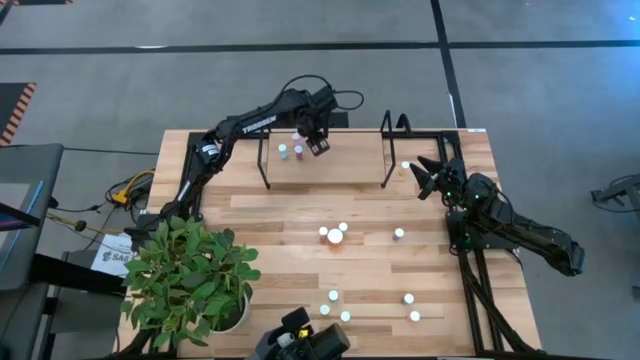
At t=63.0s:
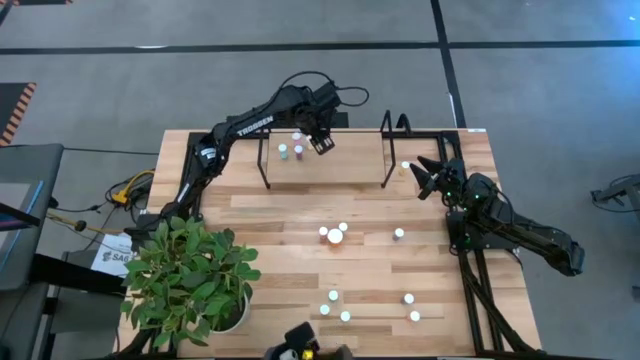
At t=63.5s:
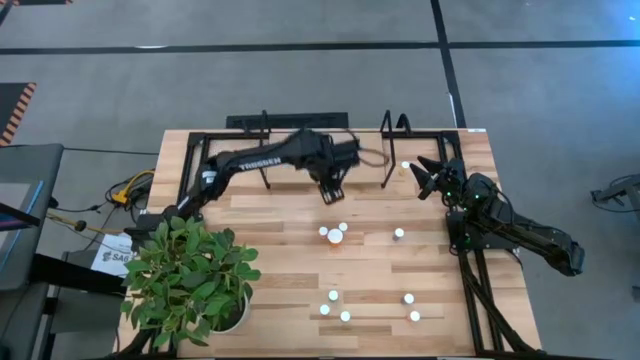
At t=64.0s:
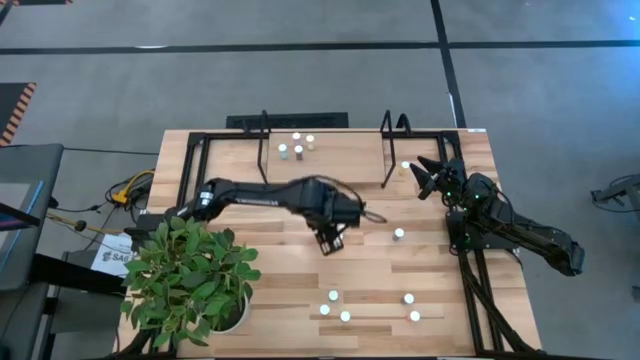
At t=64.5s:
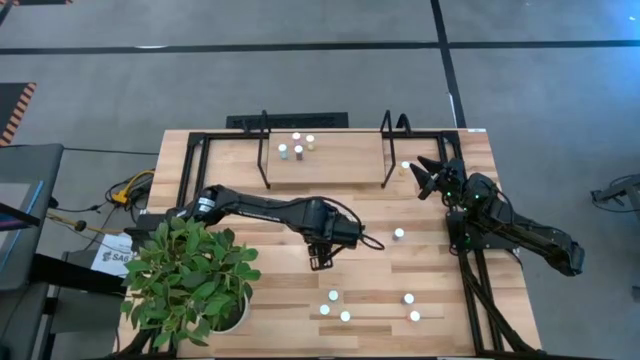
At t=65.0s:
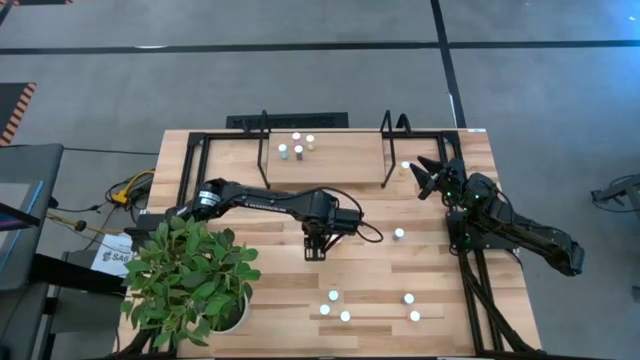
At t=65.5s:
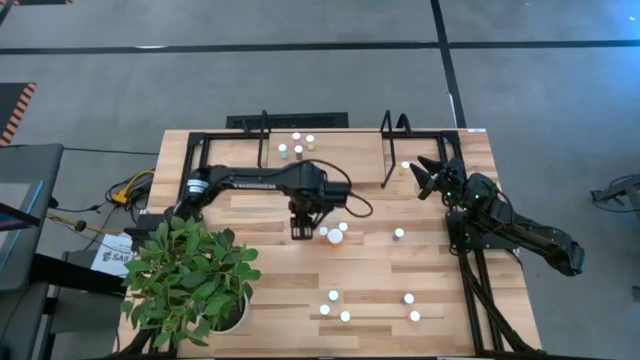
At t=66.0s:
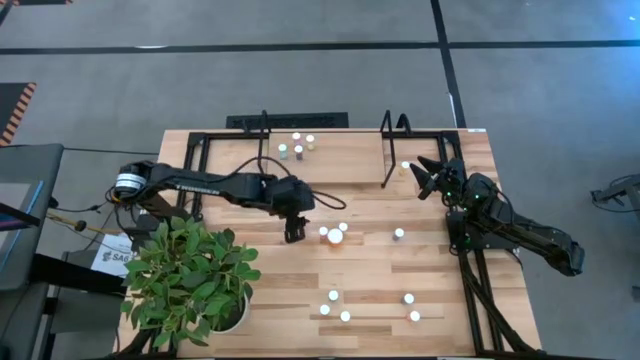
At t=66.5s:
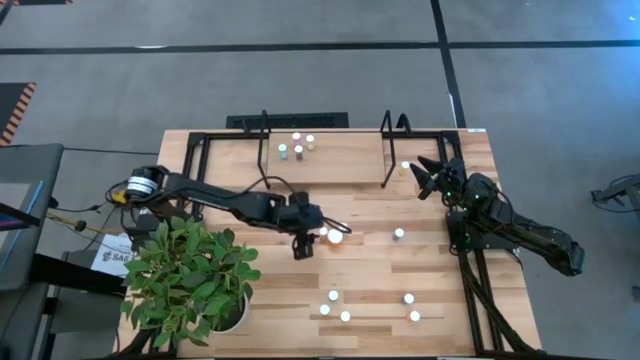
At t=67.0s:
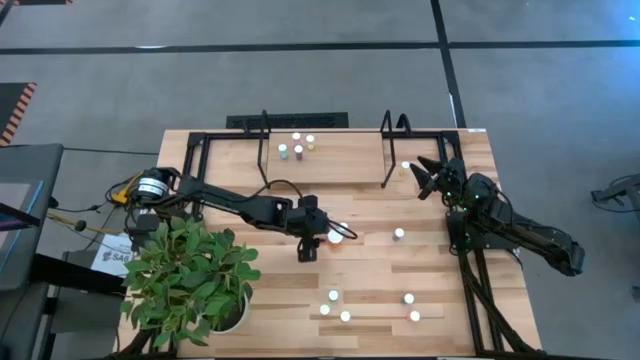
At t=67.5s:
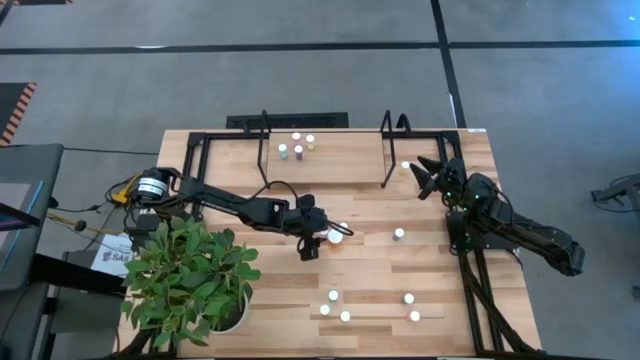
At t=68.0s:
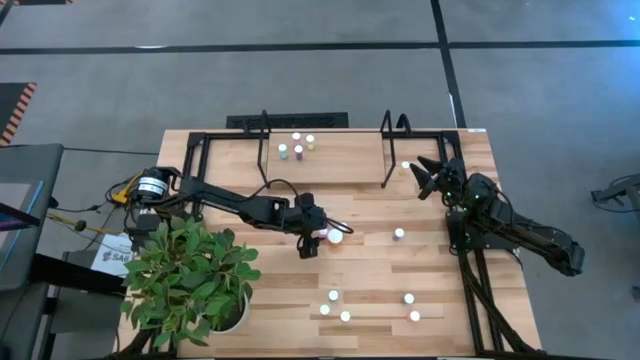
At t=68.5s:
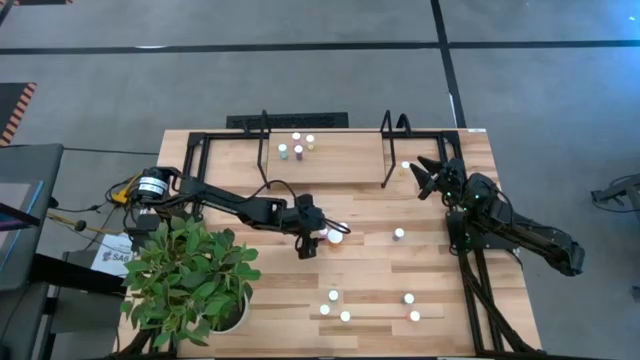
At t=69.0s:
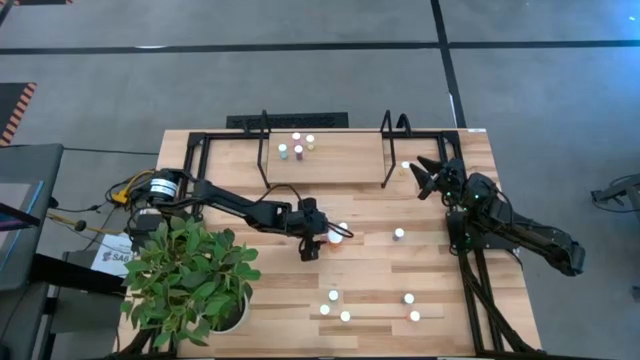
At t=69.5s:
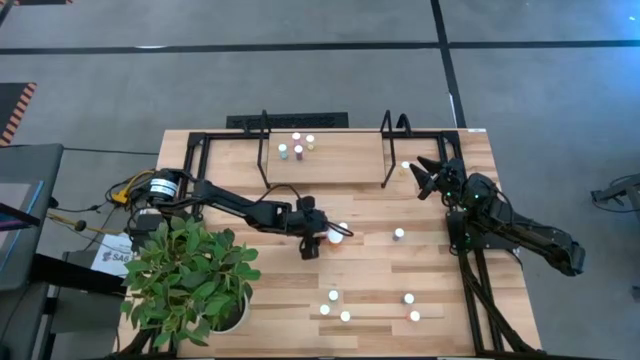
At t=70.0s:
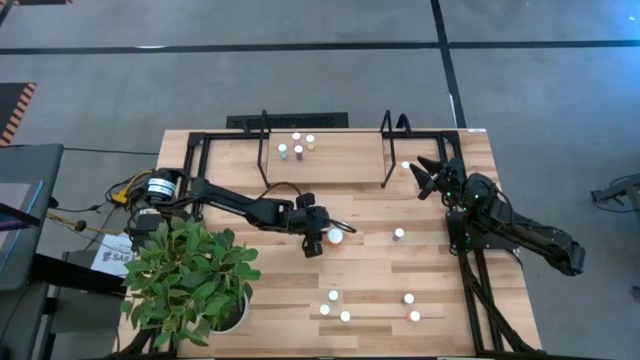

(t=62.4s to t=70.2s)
Task: Pick and place medicine bottles onto shelf by color
Put the pink pill bottle on the shelf

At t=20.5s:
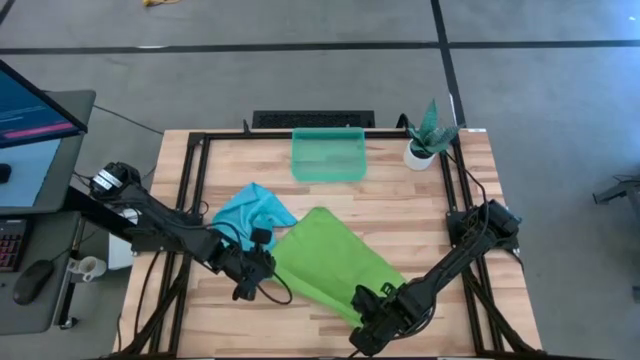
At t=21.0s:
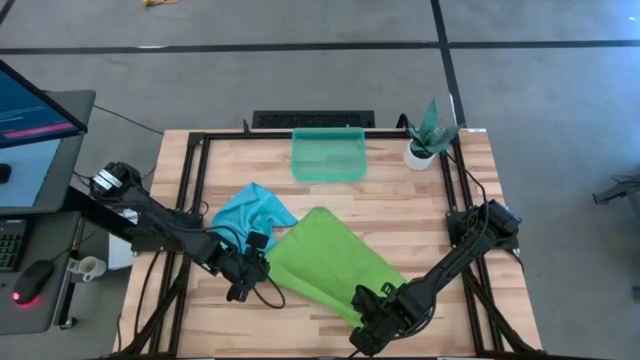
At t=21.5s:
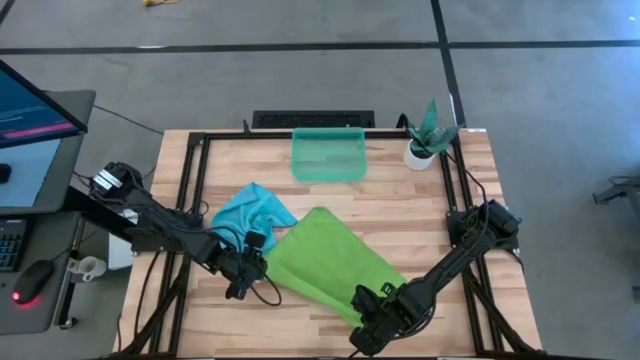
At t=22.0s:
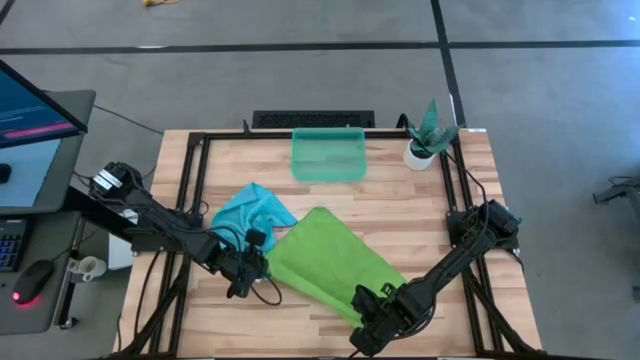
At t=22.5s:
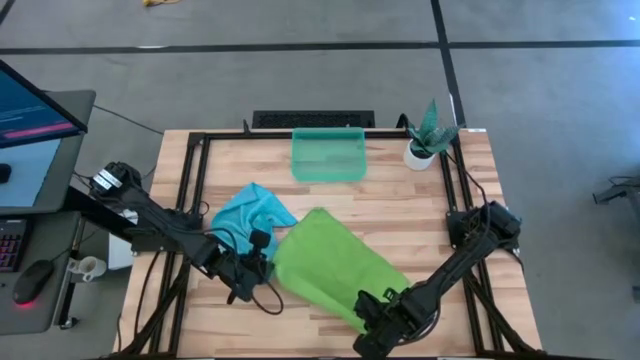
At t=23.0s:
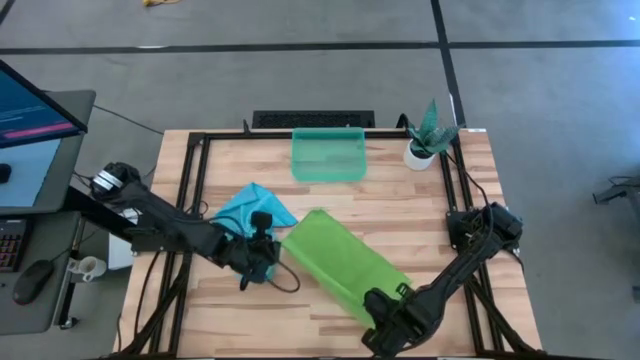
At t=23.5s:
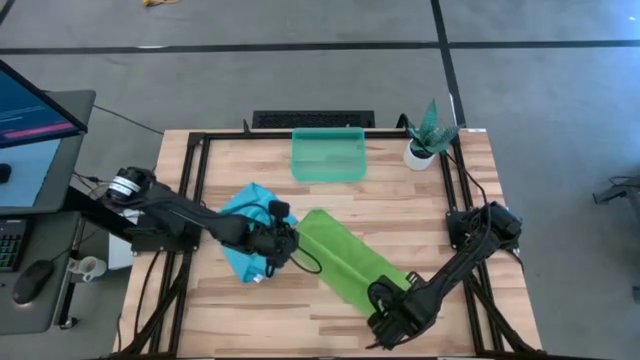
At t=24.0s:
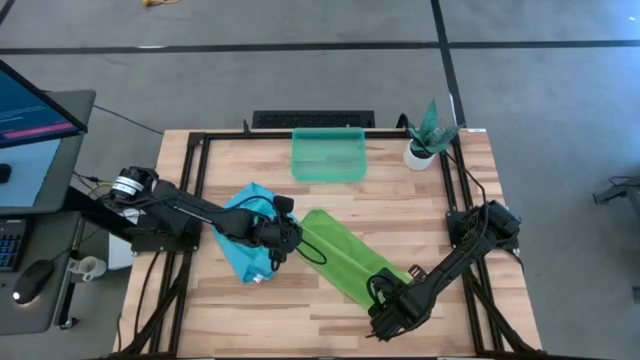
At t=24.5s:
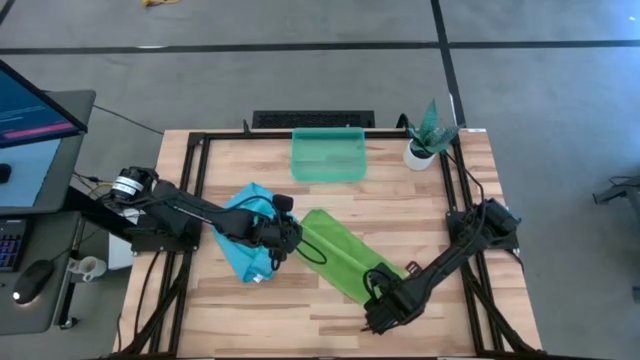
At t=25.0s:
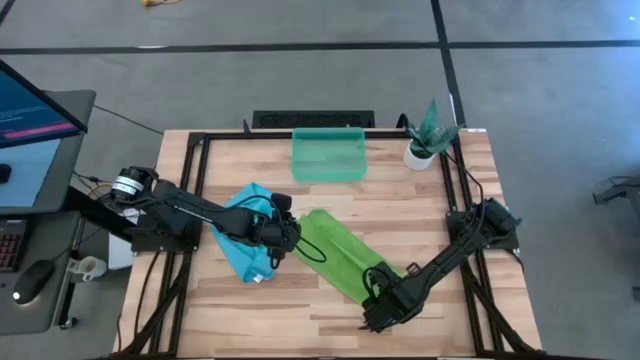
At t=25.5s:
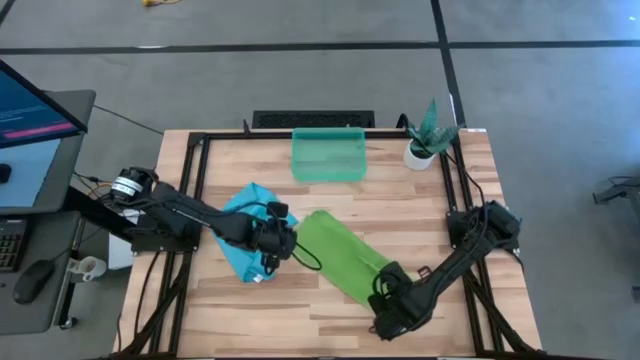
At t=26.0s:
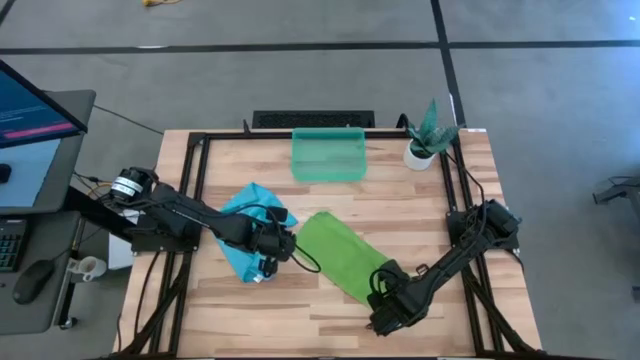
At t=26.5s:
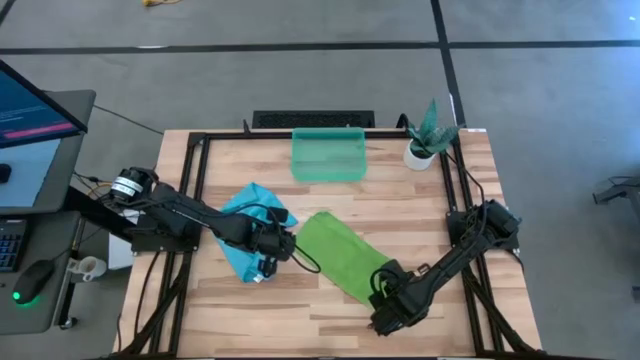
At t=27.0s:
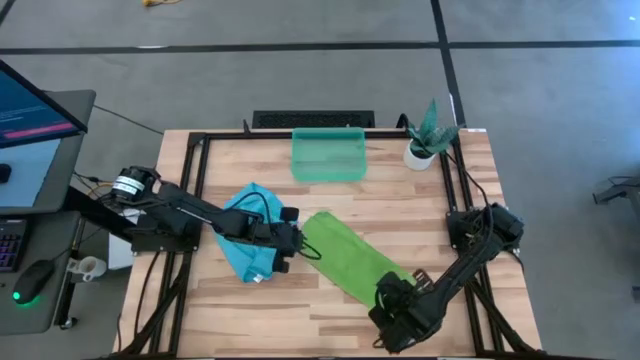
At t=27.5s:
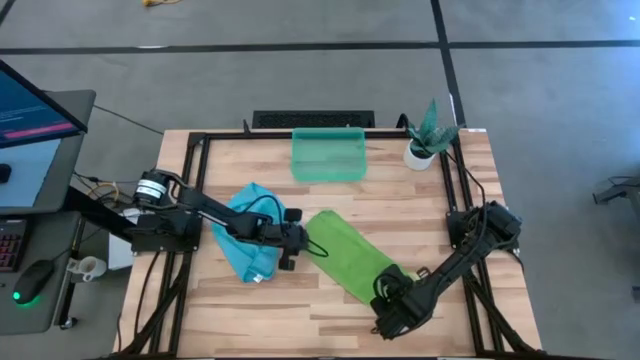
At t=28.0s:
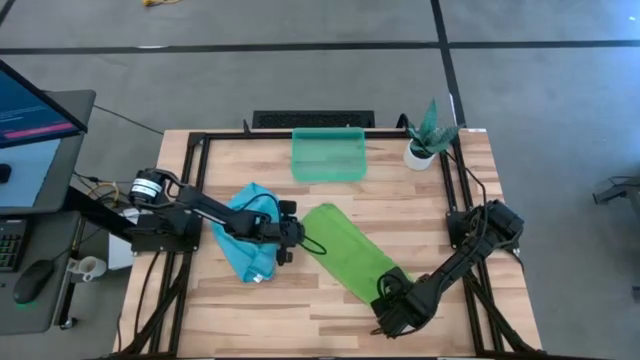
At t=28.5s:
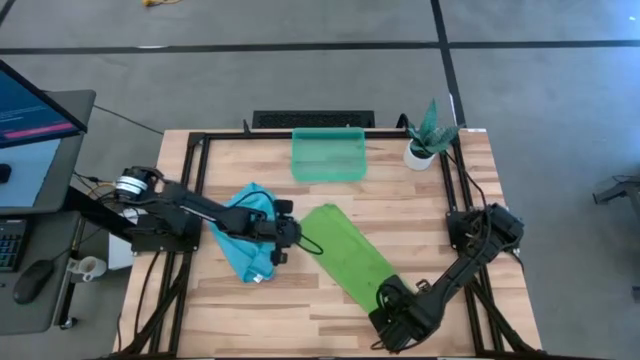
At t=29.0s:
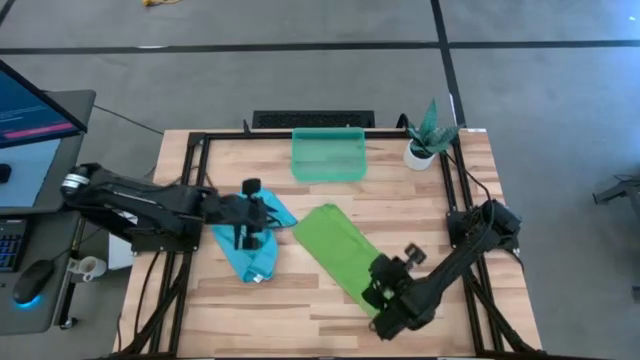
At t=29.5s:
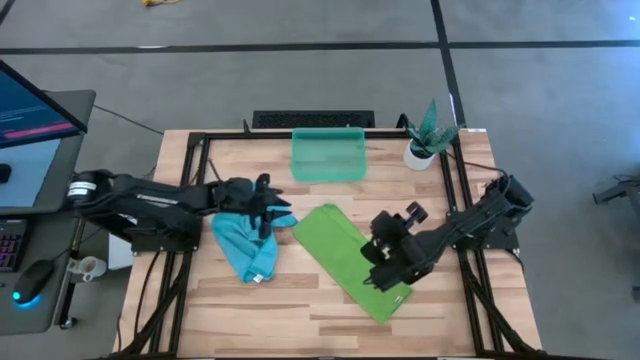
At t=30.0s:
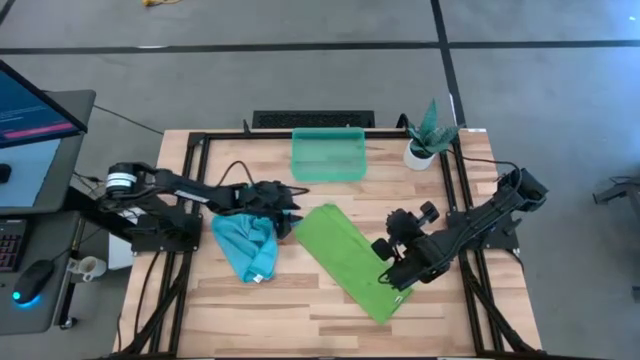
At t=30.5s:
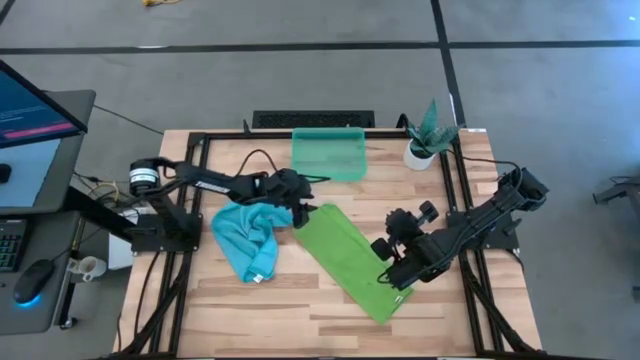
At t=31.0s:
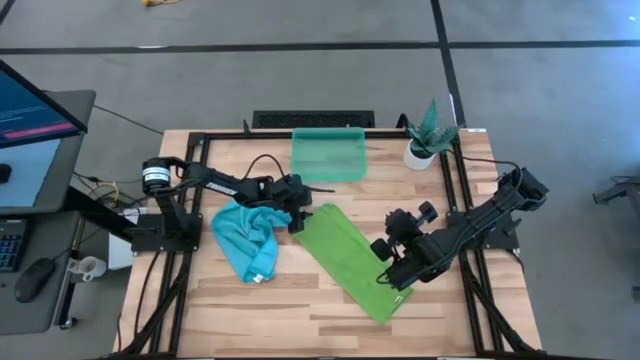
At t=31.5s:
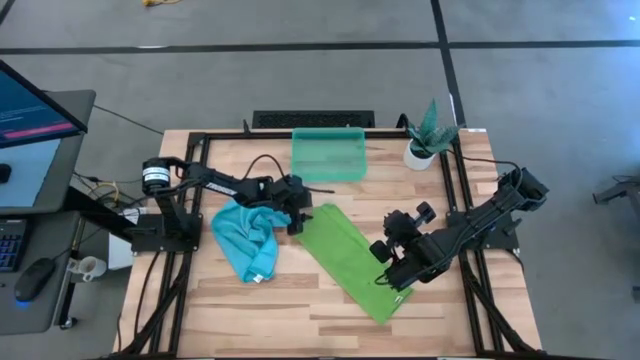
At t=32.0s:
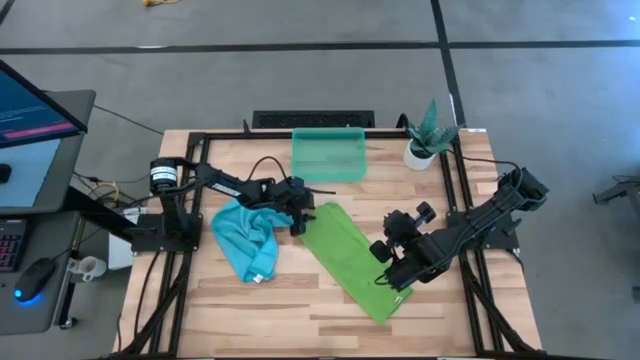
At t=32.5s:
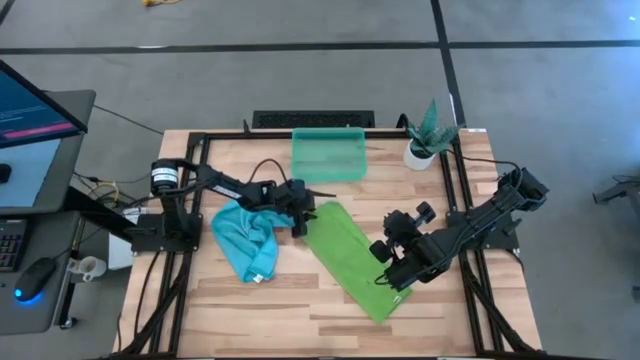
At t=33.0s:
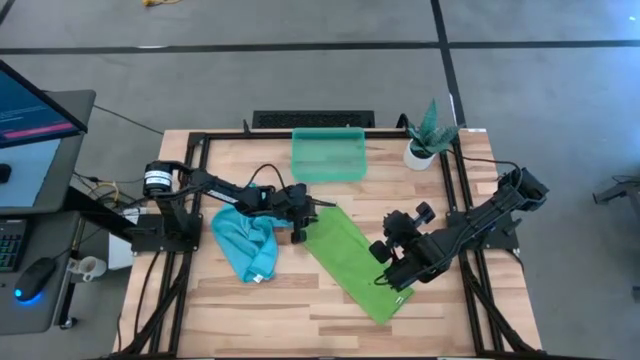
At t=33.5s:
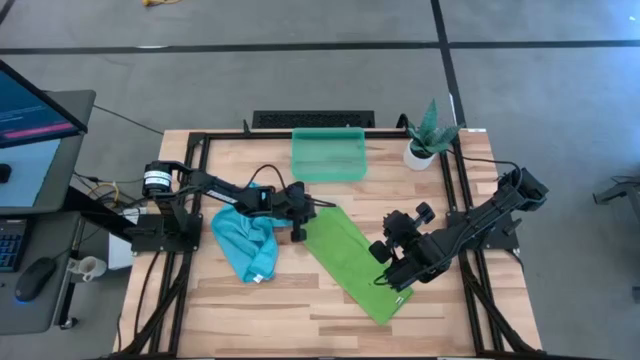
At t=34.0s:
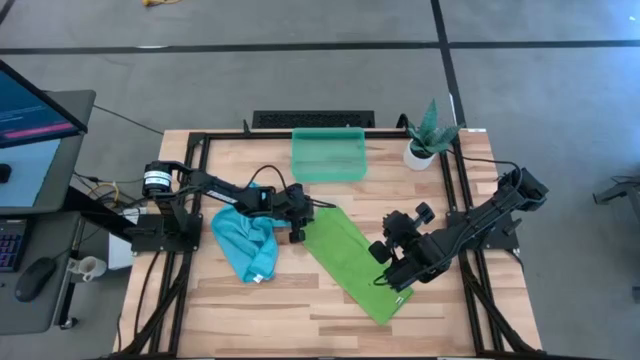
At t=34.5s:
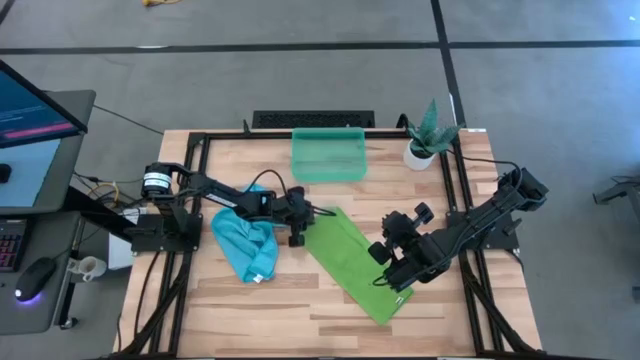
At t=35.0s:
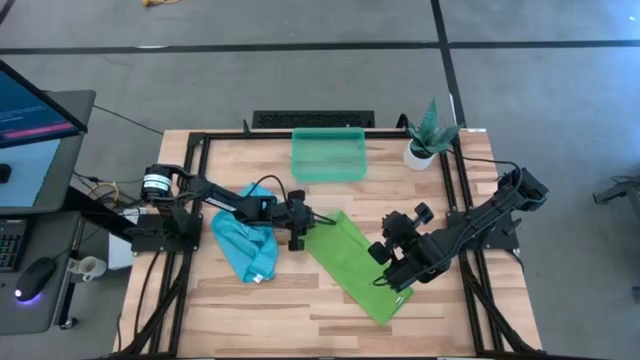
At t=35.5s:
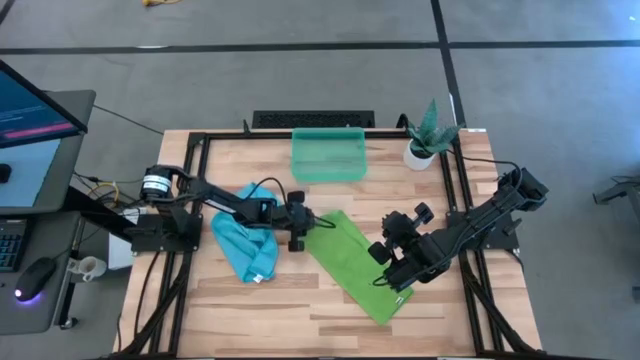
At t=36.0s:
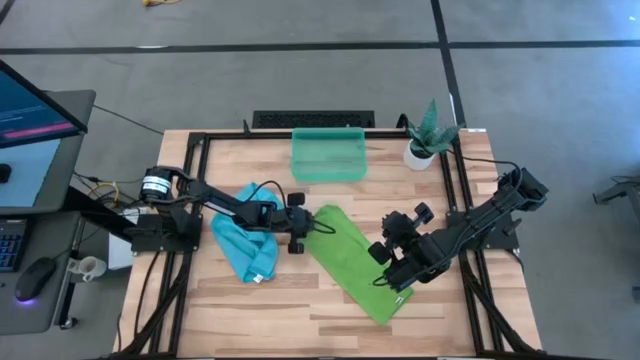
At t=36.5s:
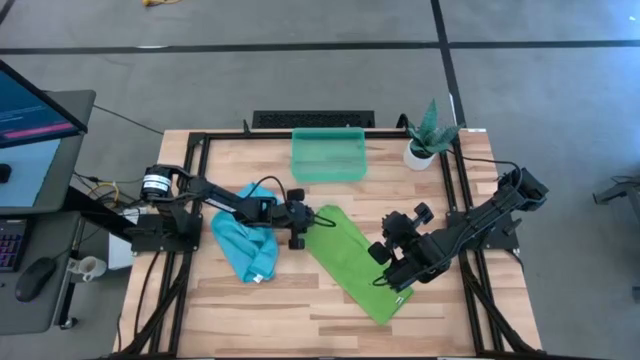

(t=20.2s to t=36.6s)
Task: Roll microfiber towels into tight, uniform cylinder then place into a basket
Fold the green microfiber cloth
